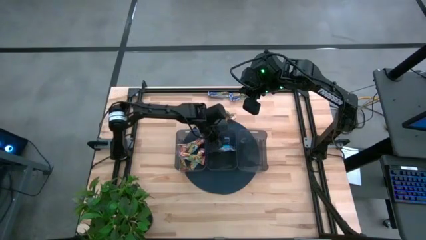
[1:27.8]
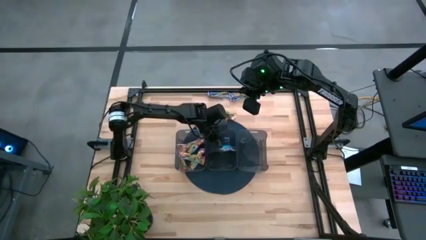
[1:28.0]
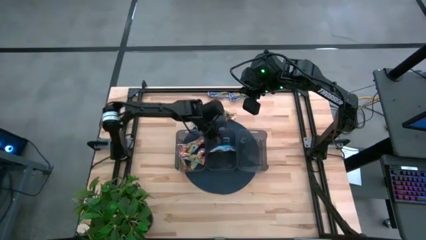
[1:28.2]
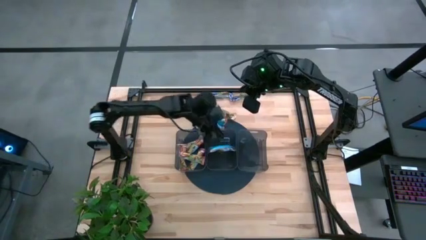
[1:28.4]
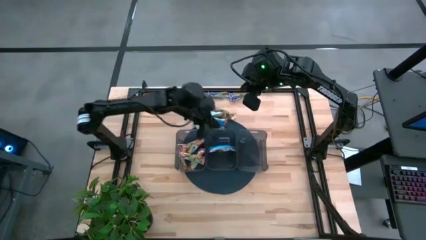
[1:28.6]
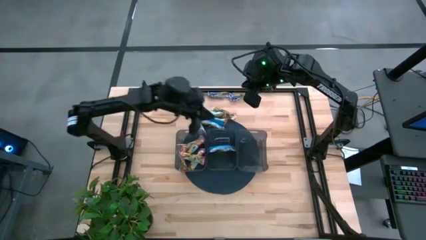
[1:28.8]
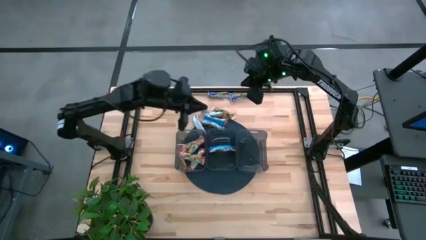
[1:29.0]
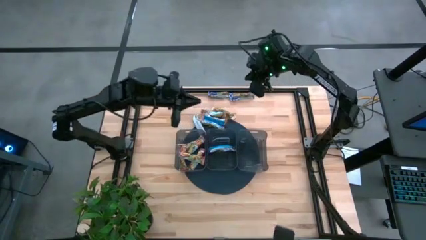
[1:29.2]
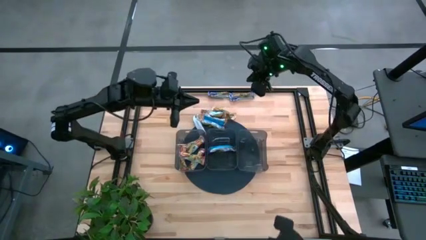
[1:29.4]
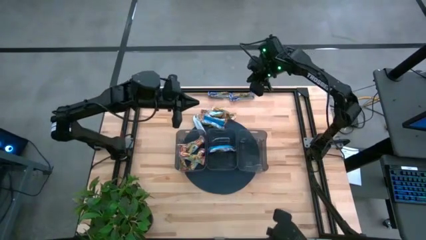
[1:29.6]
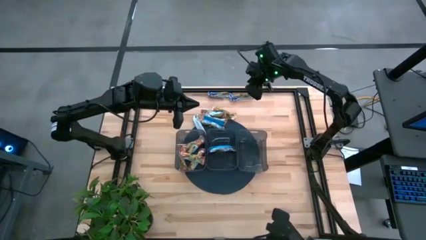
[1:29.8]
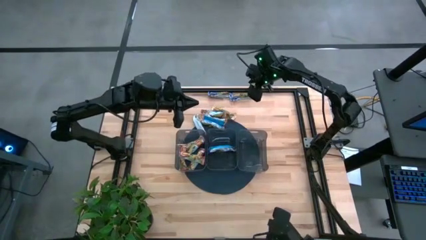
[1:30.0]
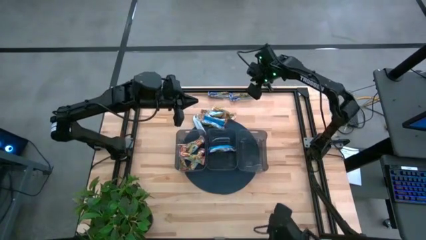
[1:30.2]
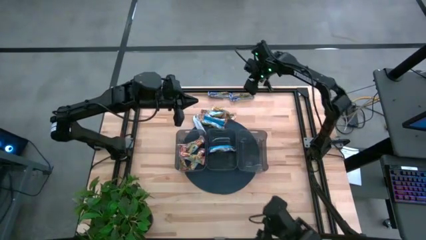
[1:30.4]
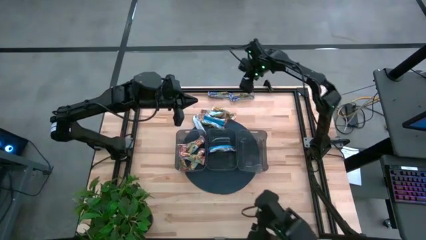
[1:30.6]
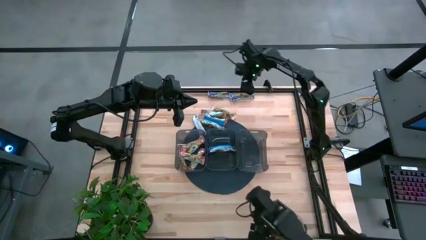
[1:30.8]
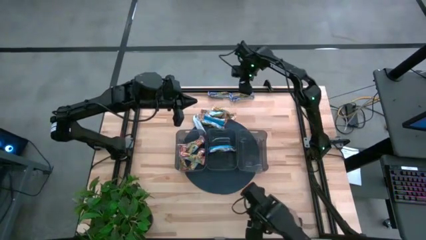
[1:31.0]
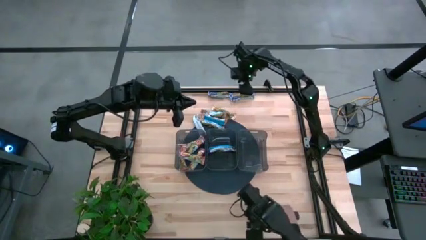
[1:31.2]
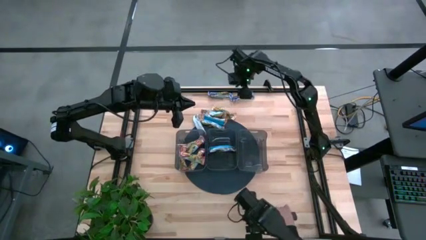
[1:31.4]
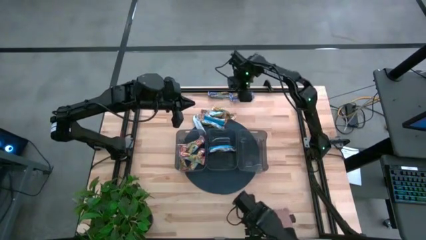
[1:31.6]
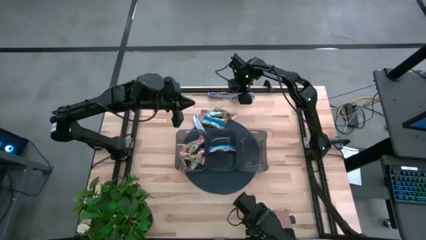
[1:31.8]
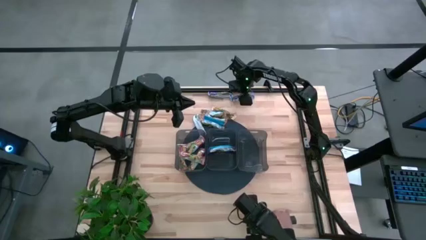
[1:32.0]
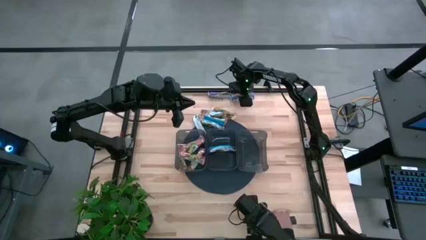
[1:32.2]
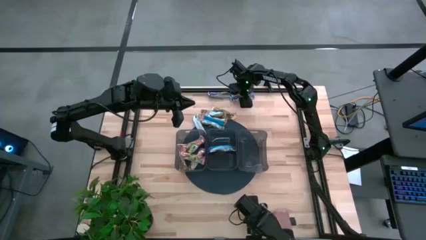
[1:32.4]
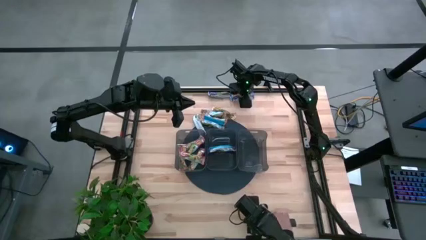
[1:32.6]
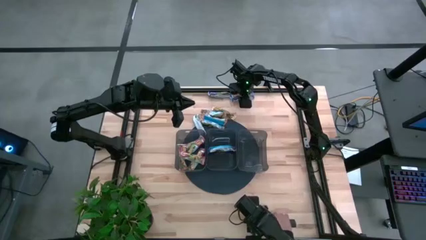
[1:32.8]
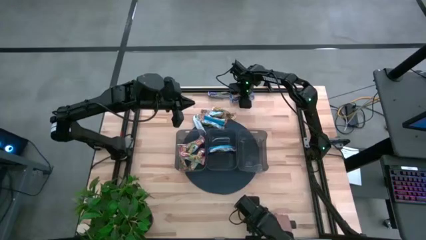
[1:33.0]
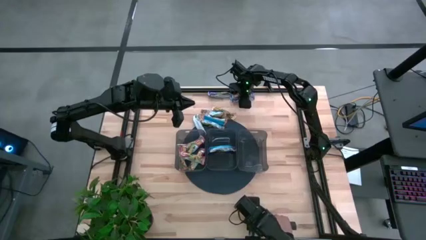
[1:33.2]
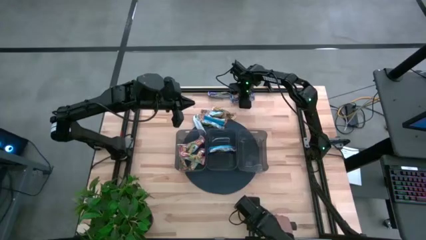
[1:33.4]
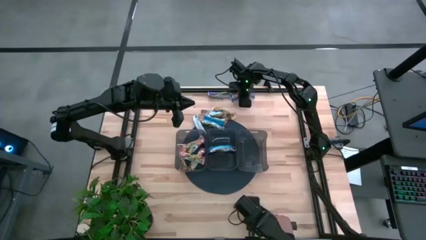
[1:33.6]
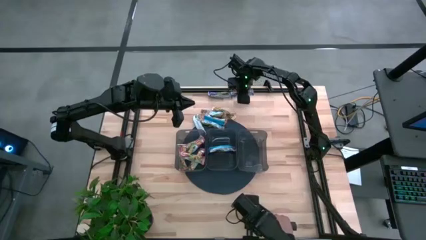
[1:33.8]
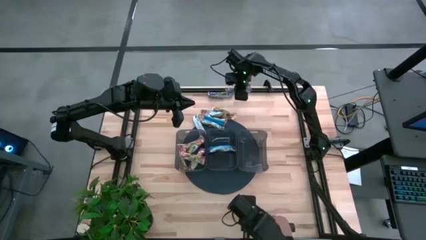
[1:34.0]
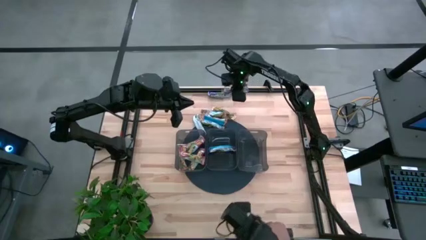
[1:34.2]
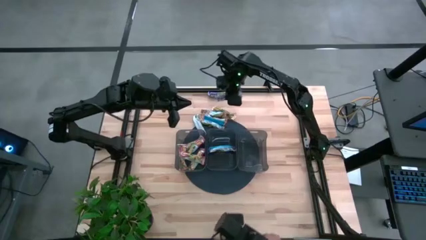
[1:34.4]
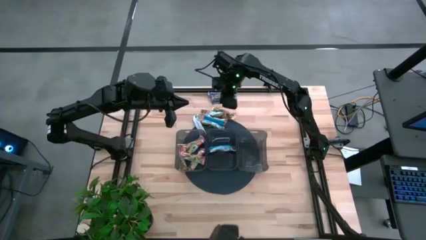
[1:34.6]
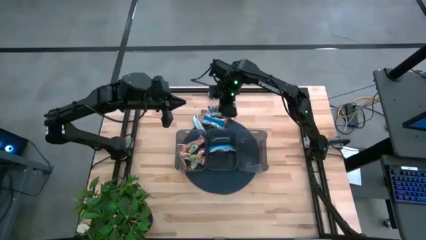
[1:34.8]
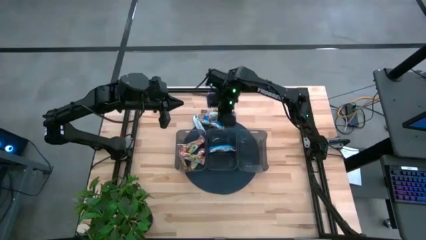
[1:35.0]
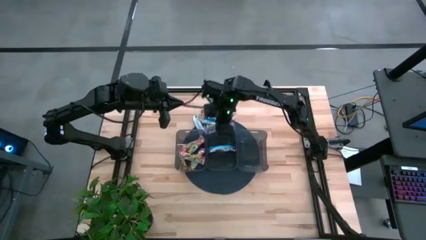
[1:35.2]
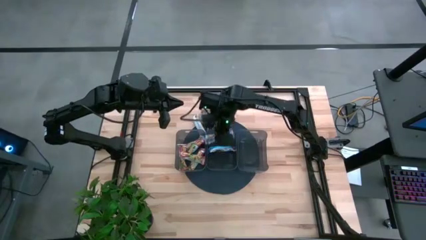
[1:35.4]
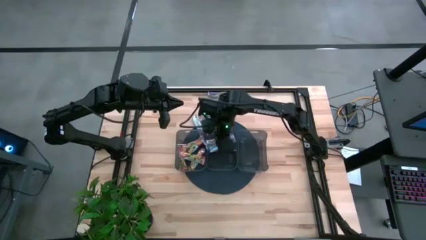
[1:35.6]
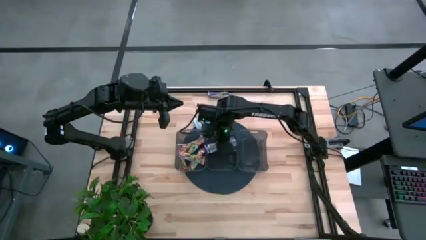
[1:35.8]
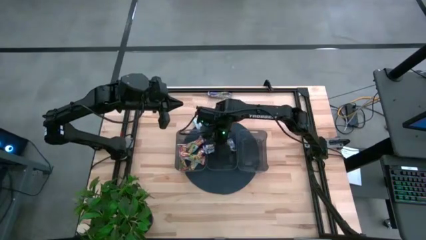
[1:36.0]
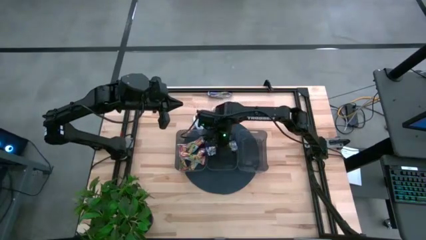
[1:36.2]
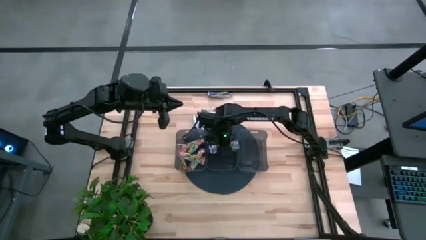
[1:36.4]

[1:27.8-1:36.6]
Task: Pick and place Granola Bars by type
Put the blue granola bar into the middle black bin

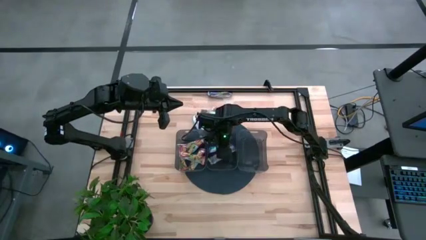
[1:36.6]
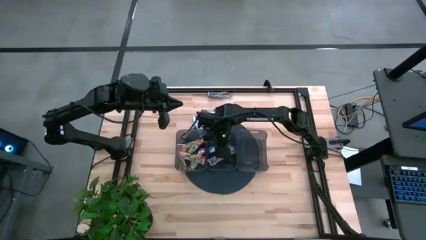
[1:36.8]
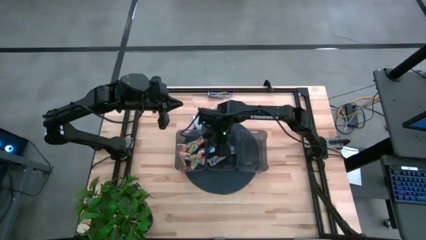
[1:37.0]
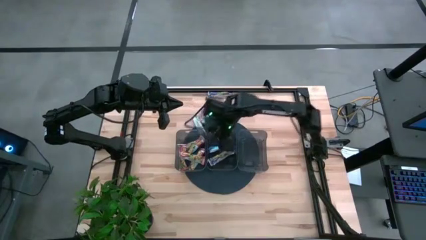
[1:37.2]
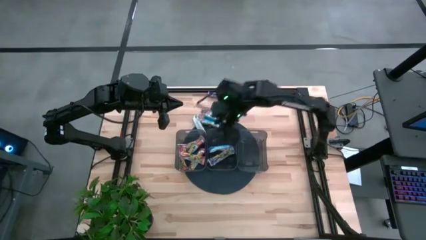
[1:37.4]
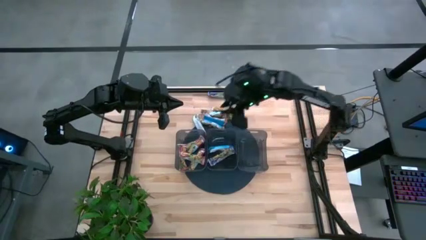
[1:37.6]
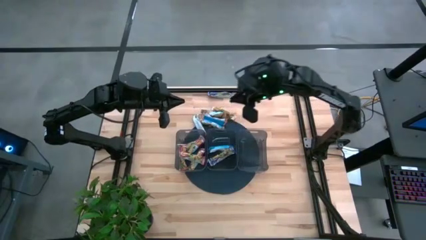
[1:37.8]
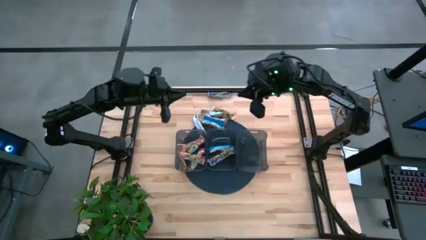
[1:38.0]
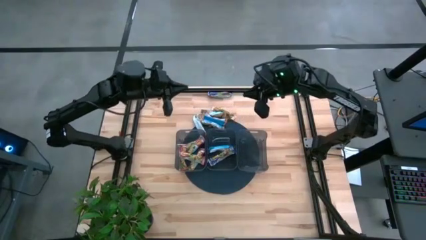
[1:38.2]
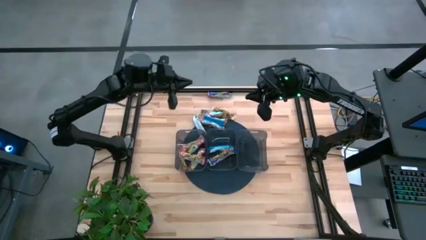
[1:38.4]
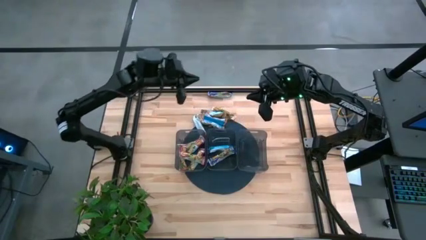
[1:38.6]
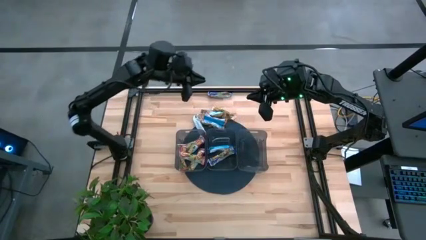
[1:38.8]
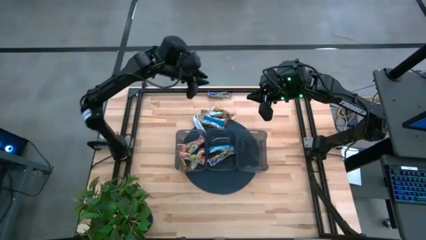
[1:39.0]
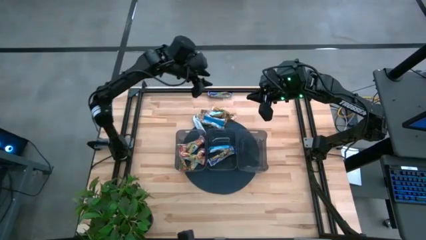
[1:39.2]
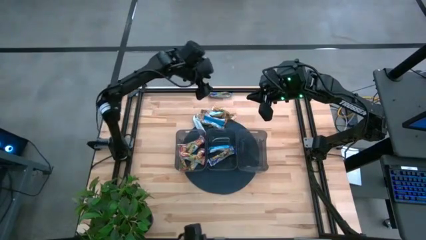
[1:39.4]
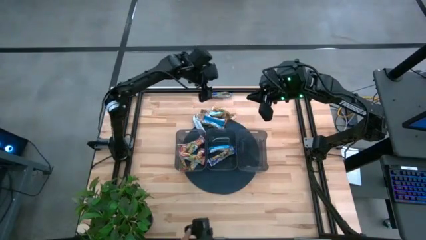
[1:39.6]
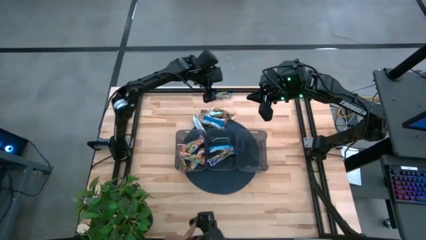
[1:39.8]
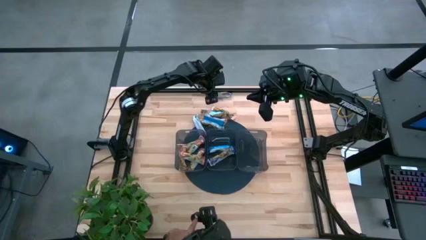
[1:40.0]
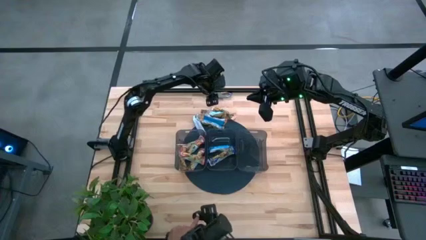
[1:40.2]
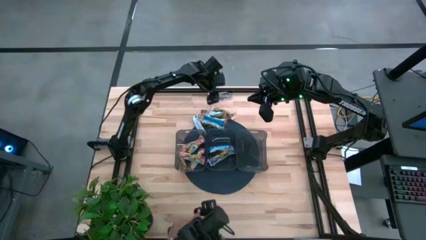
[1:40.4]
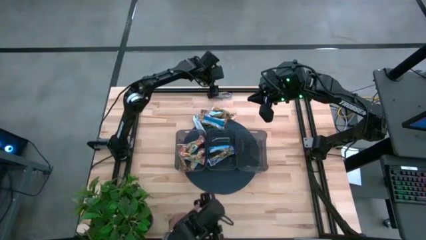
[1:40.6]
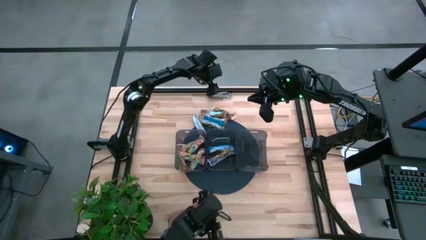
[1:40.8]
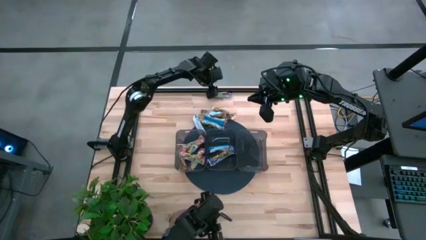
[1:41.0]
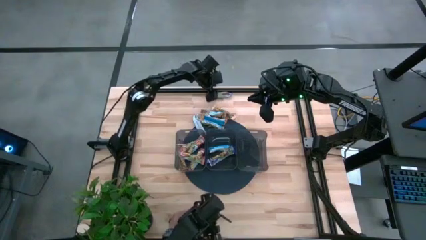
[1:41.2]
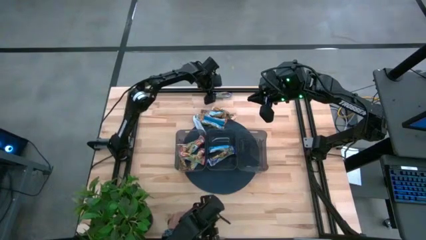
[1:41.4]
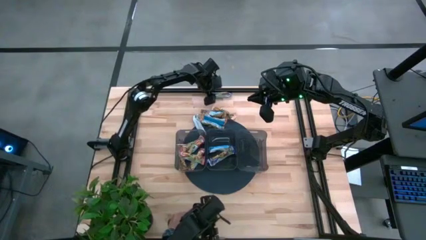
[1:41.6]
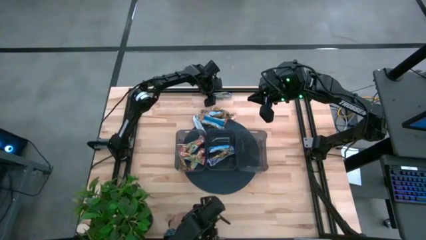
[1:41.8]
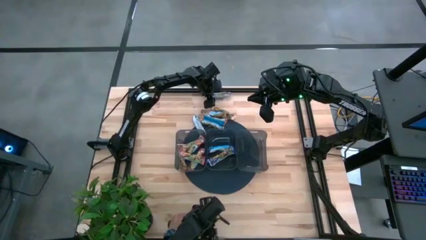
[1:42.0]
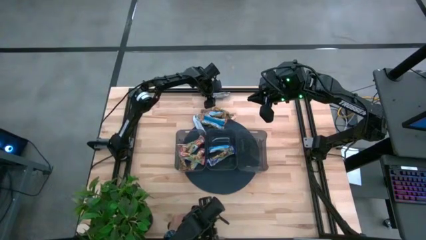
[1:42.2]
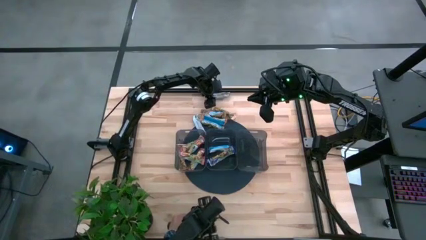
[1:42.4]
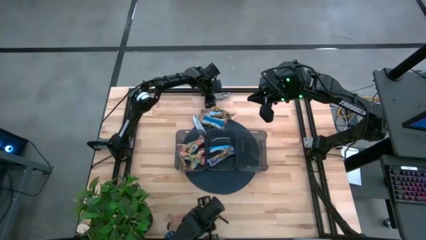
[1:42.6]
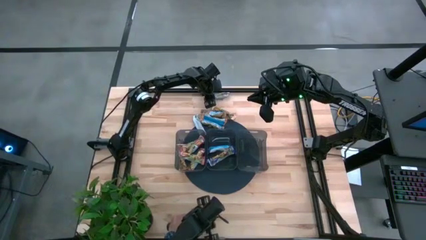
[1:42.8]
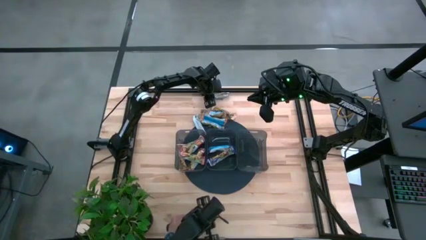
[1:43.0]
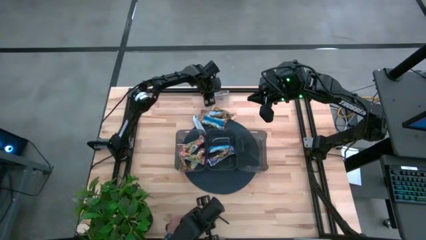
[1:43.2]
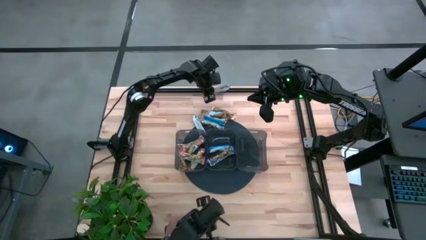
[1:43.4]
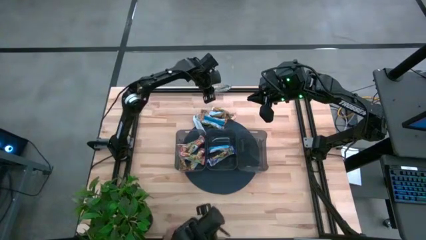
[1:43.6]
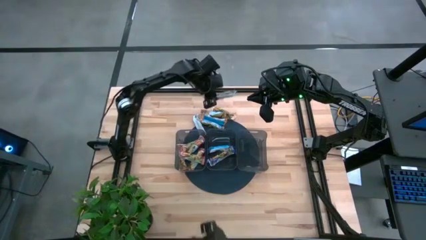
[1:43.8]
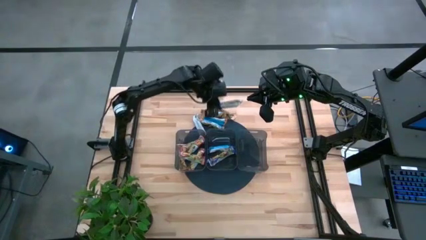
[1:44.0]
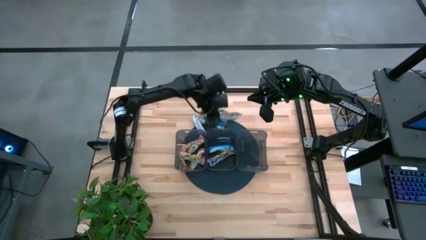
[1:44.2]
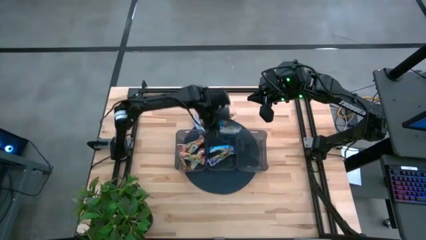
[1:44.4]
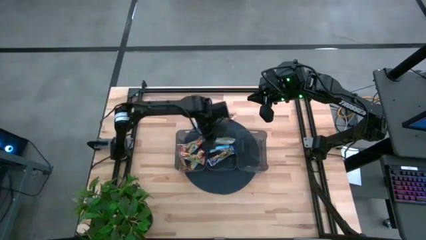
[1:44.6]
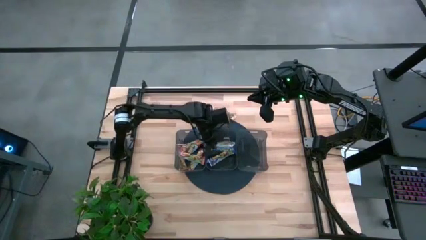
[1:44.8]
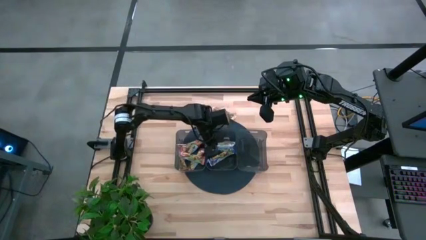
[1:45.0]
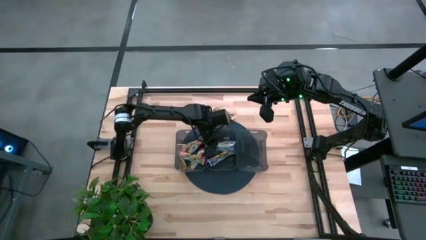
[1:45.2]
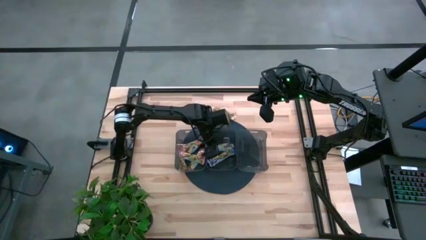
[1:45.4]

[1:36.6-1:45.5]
Put the blue granola bar into the middle black bin
